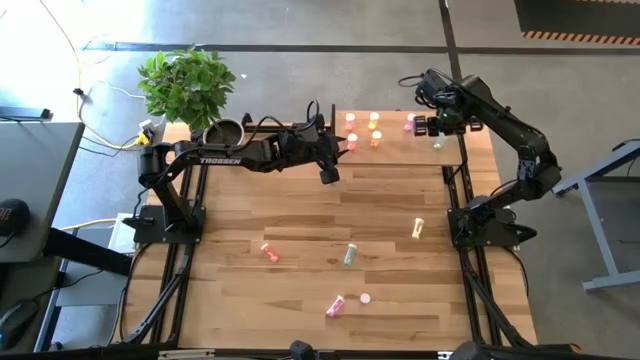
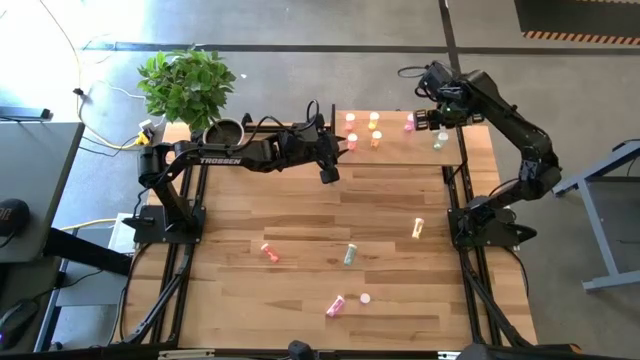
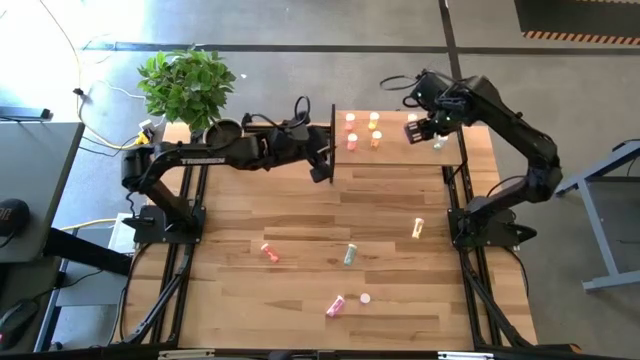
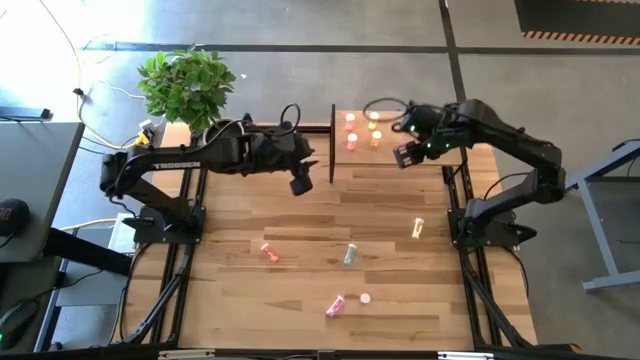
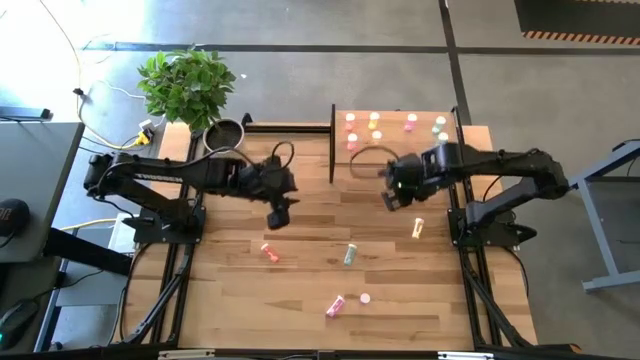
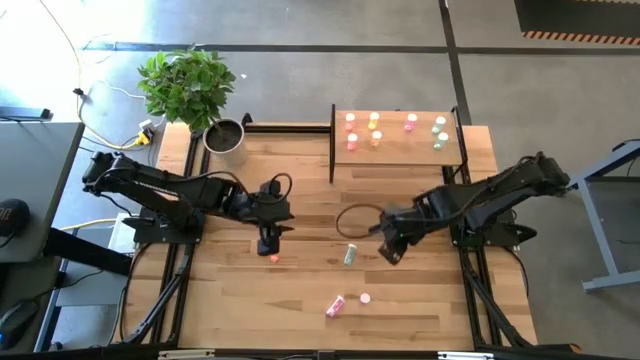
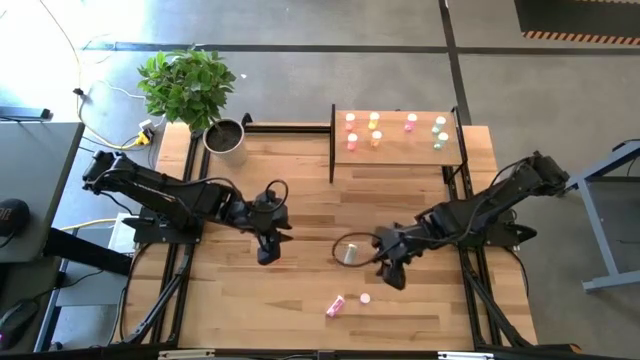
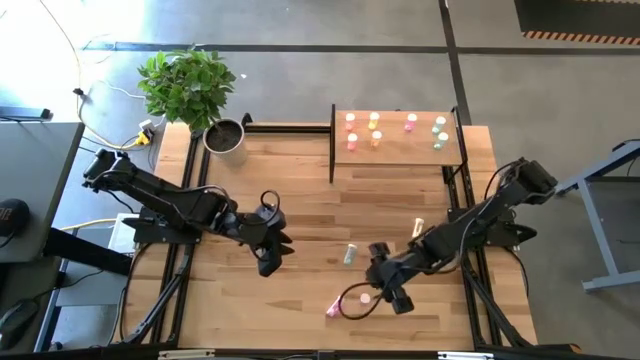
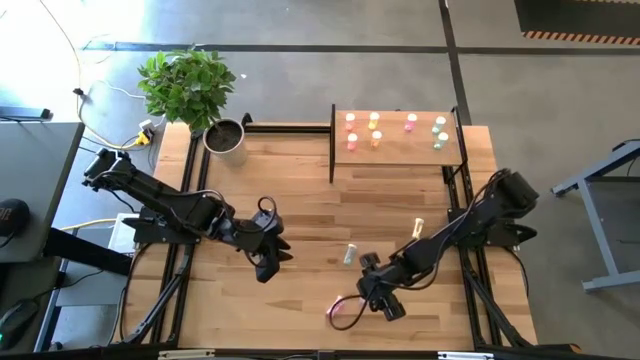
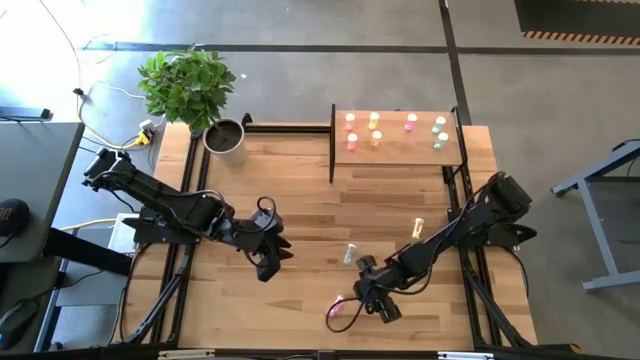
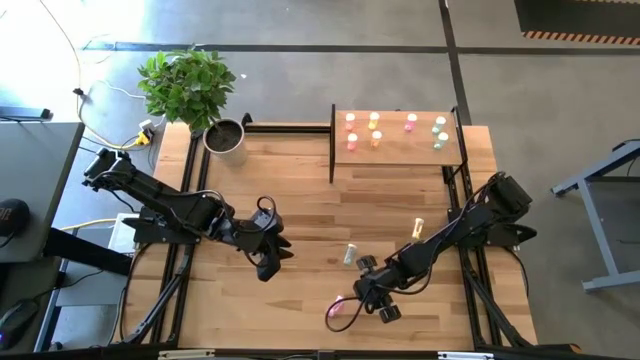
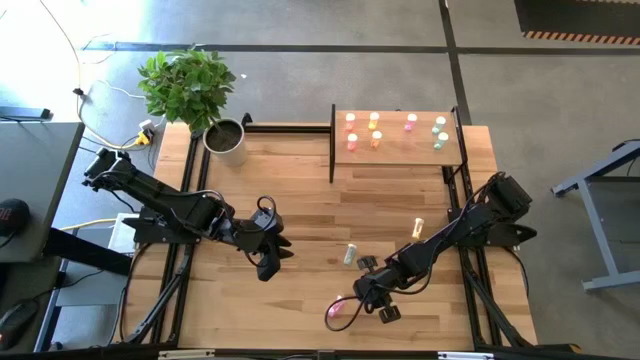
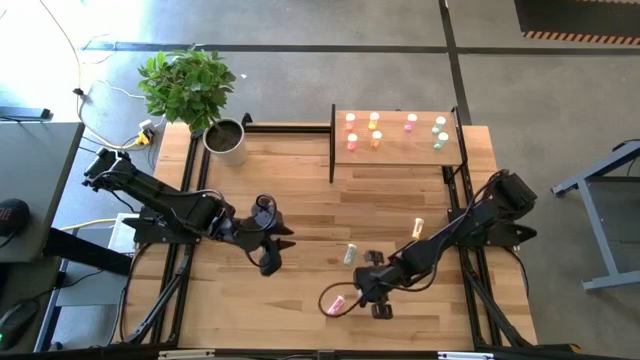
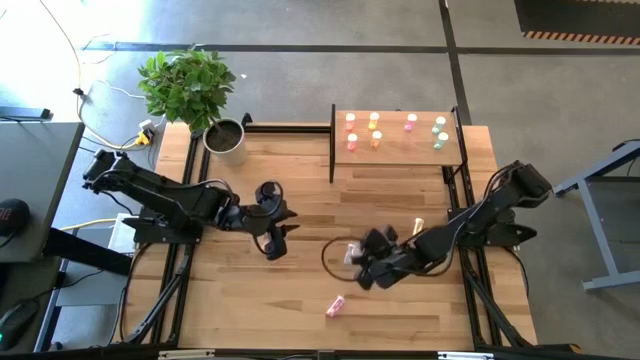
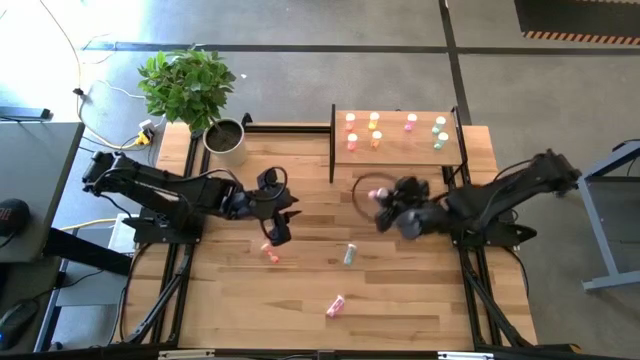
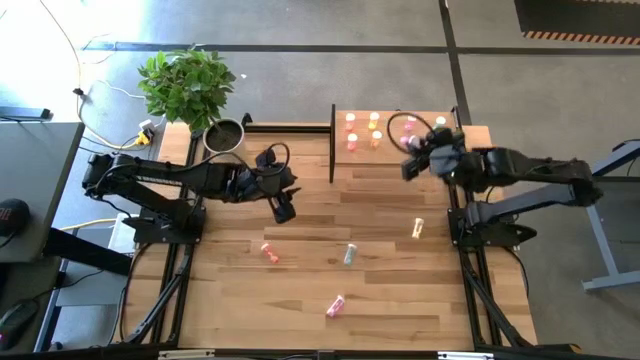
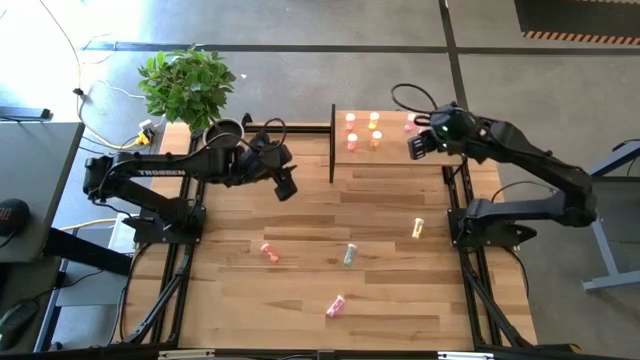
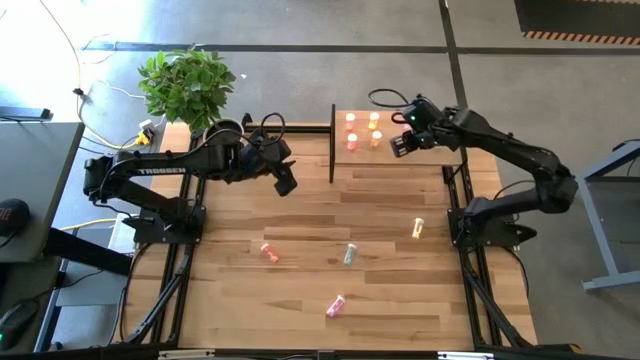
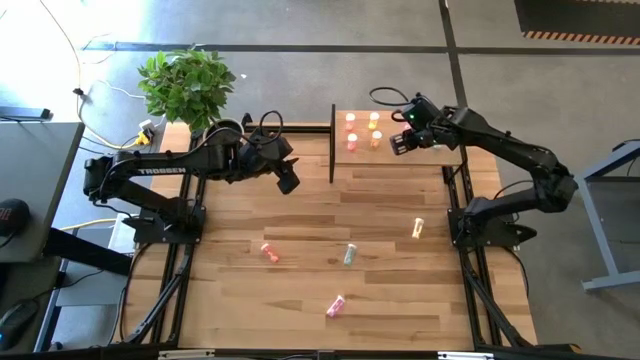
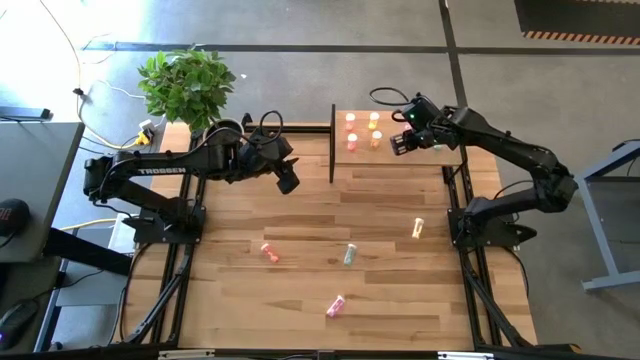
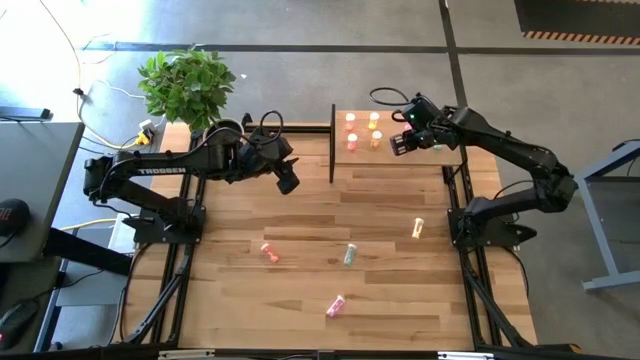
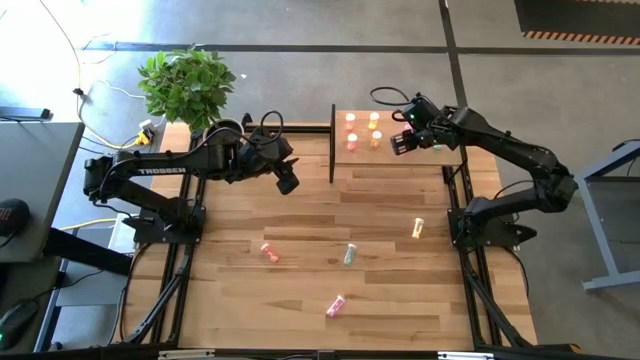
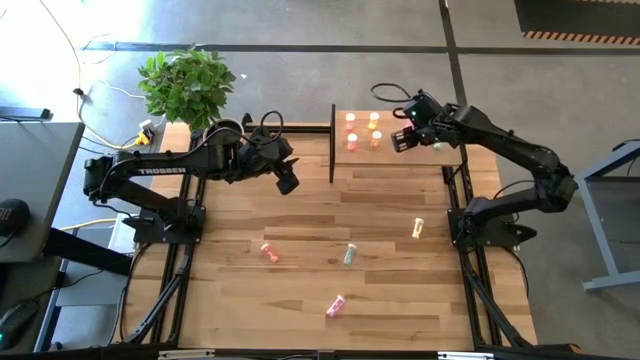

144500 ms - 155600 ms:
Task: Pick and place medicine bottles onto shelf by color
Put the right violet medicine bottle aligned with the other violet medicine bottle on the shelf

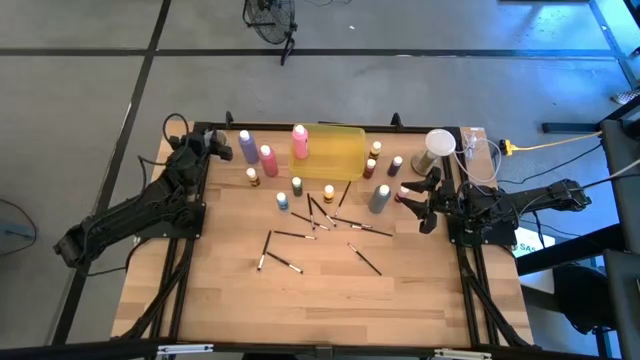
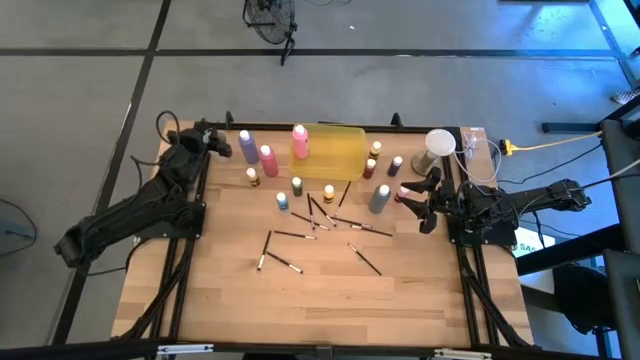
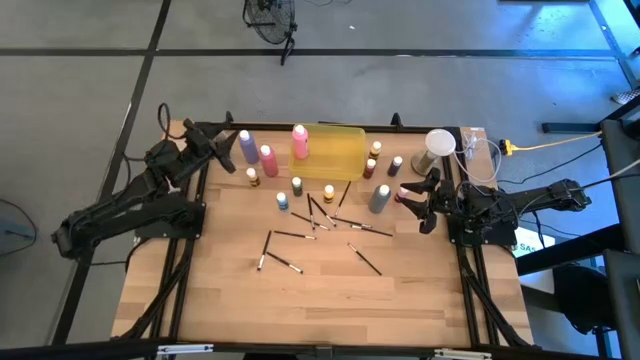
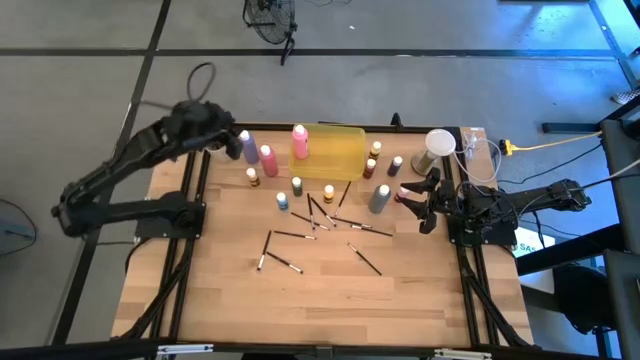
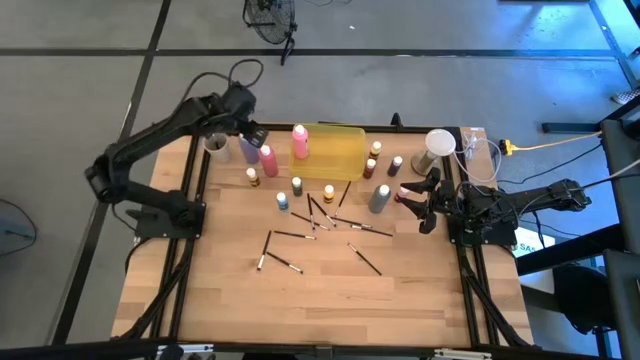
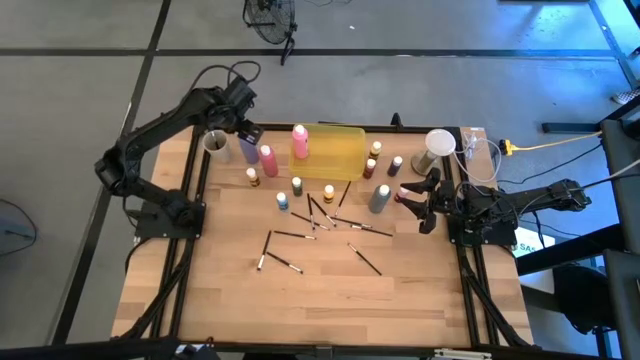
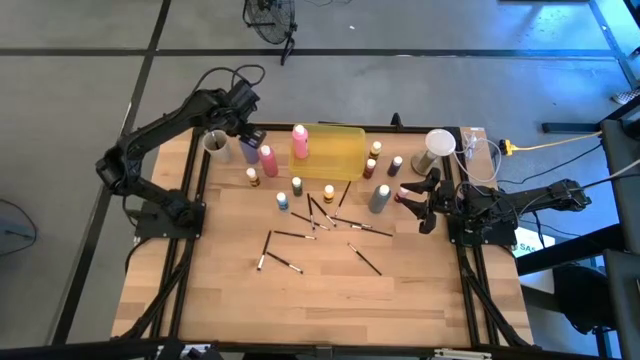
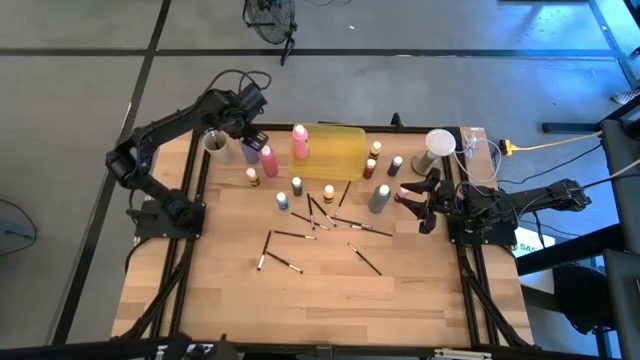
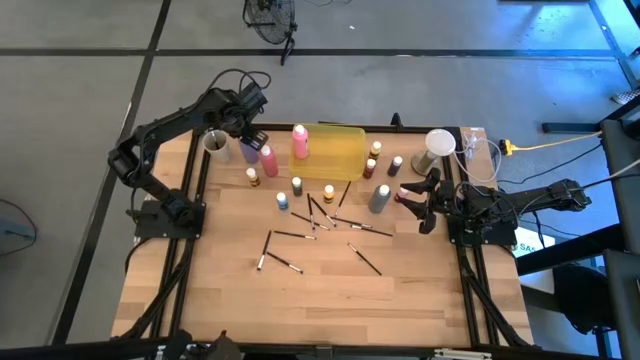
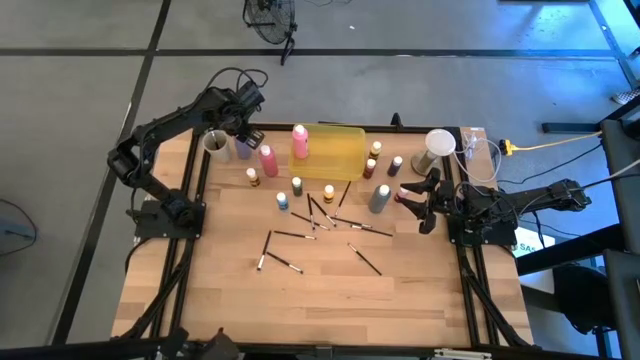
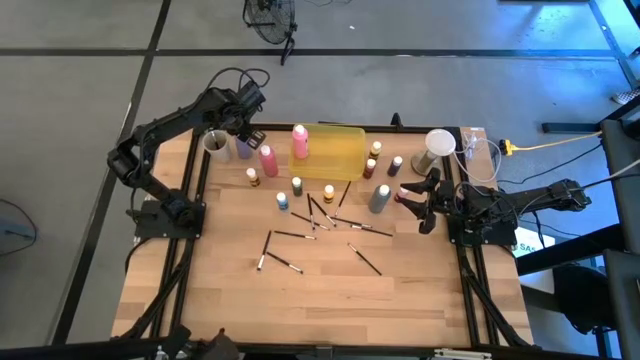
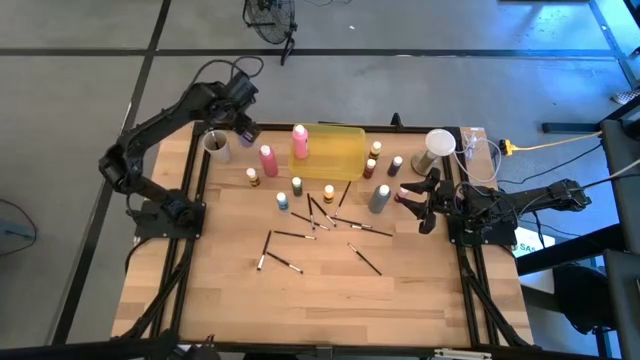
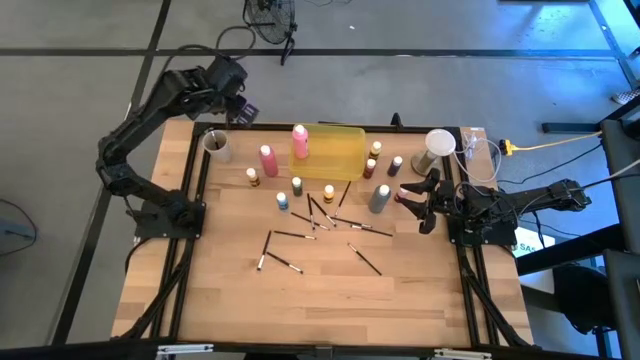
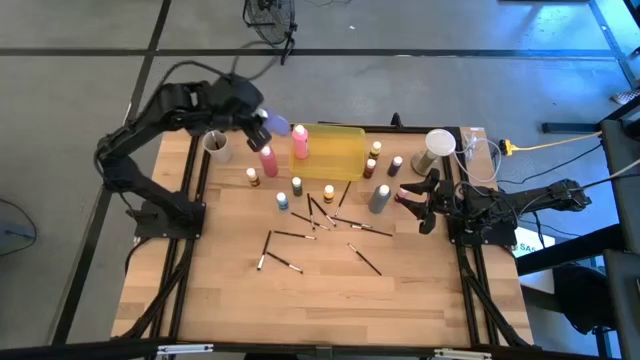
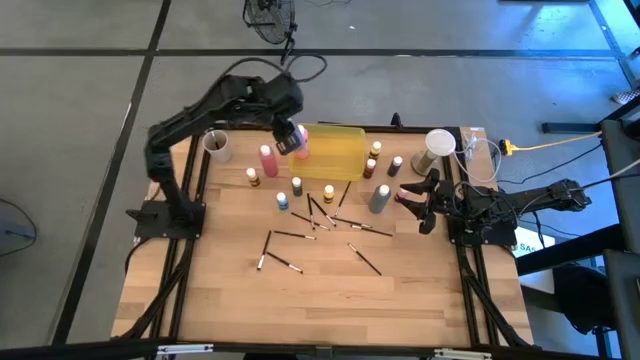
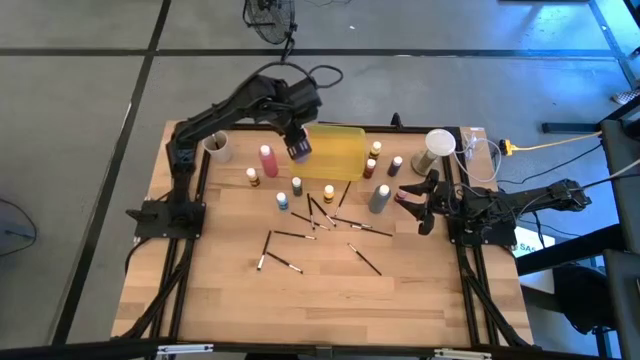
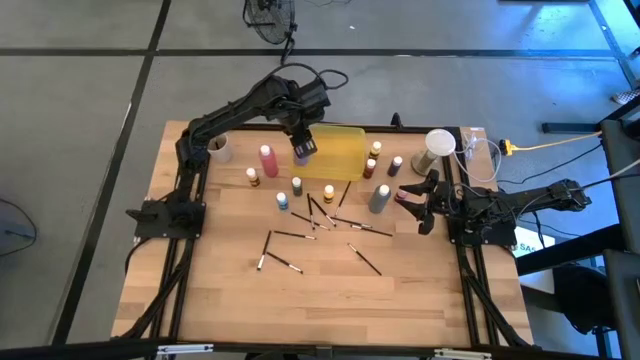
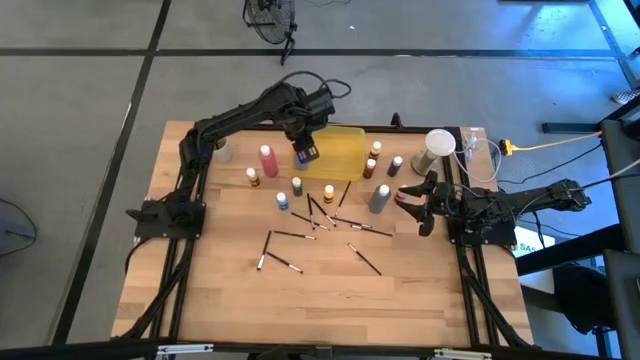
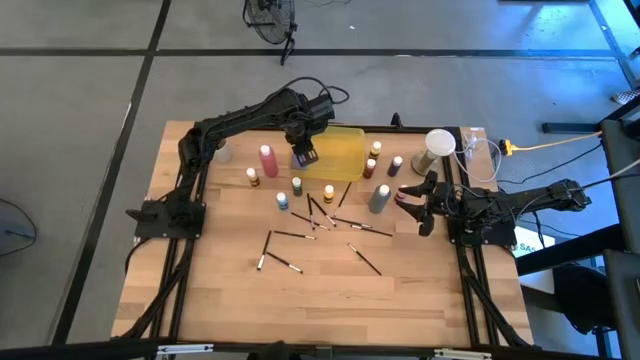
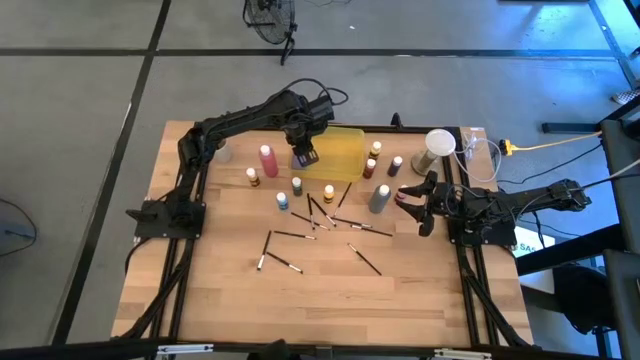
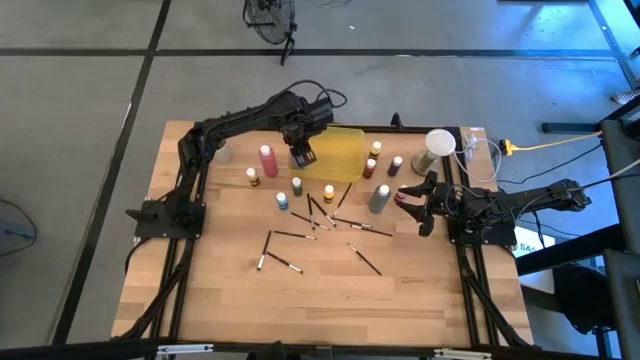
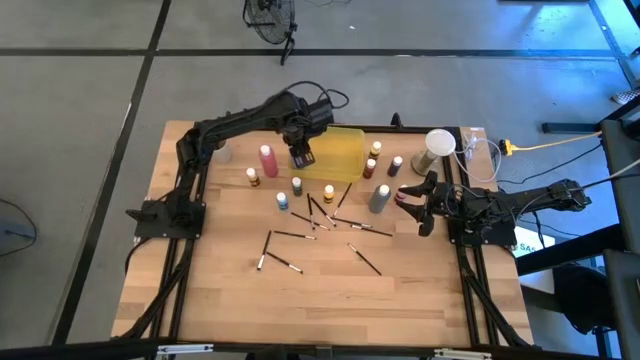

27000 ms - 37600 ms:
Task: Pick & Place Paint Supplies
Put the large purple paint bottle into the yellow bin
